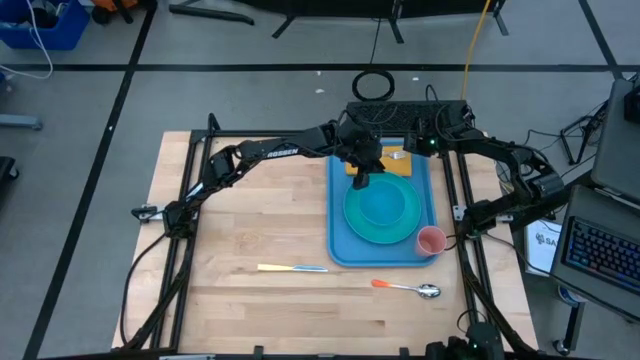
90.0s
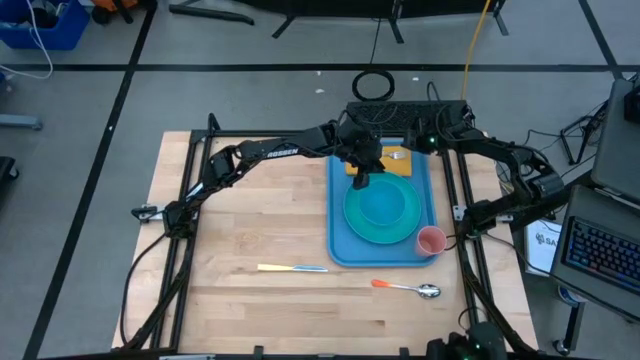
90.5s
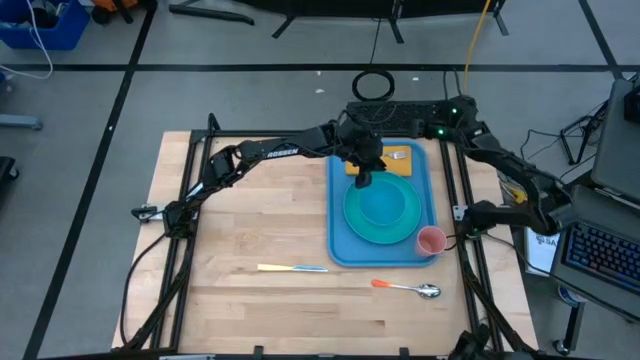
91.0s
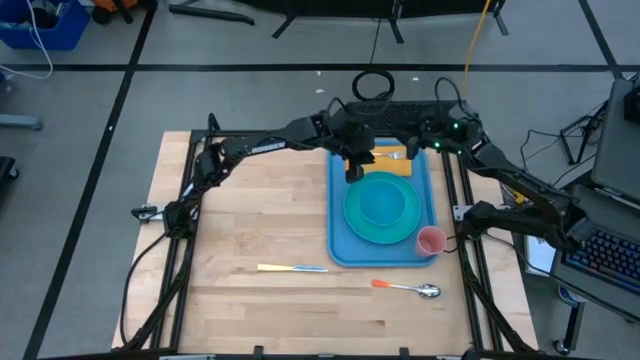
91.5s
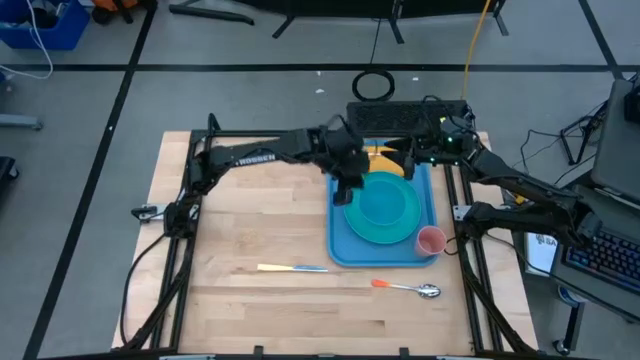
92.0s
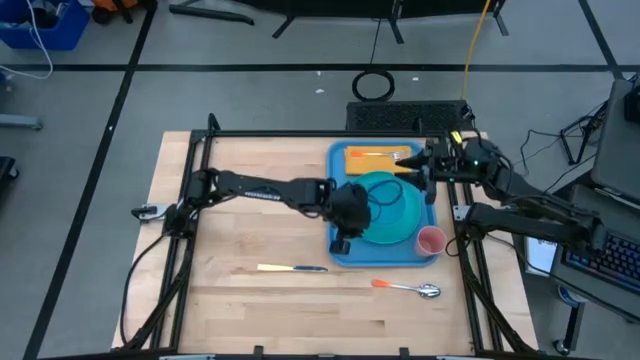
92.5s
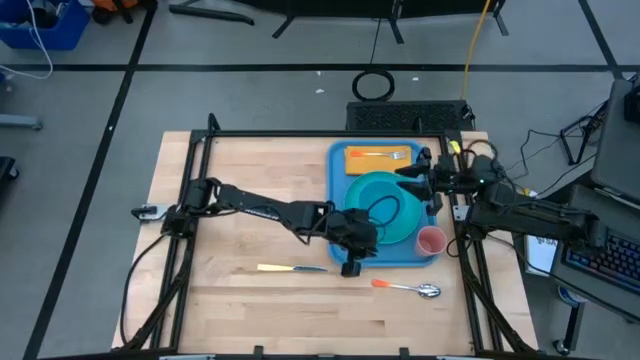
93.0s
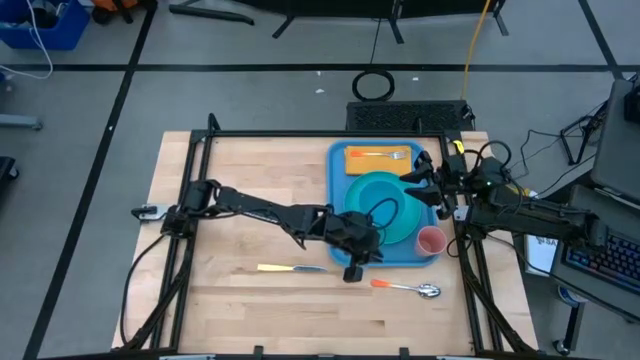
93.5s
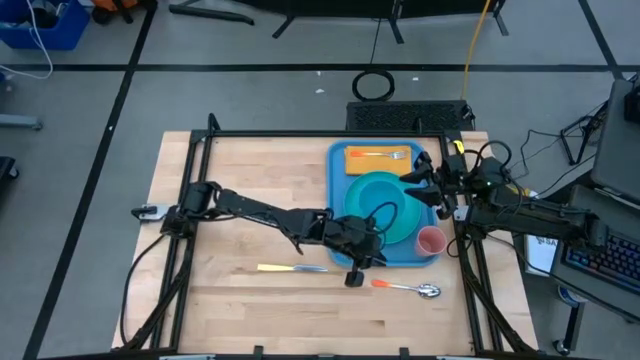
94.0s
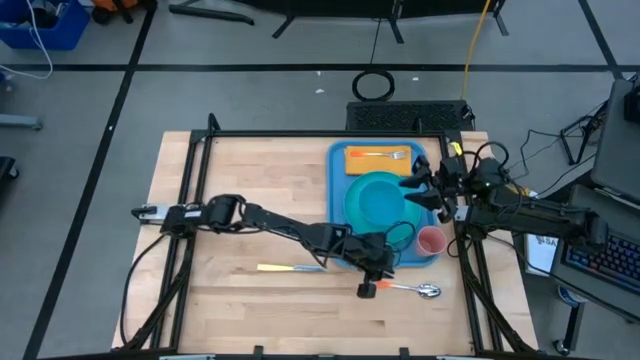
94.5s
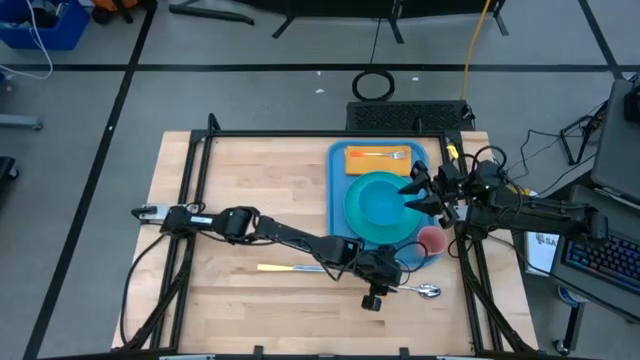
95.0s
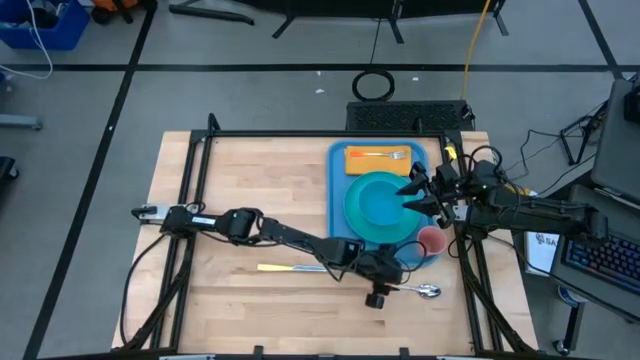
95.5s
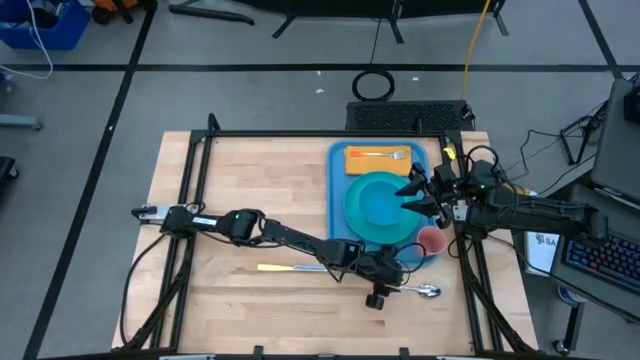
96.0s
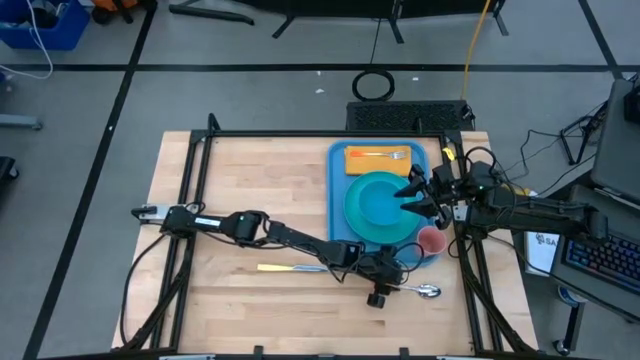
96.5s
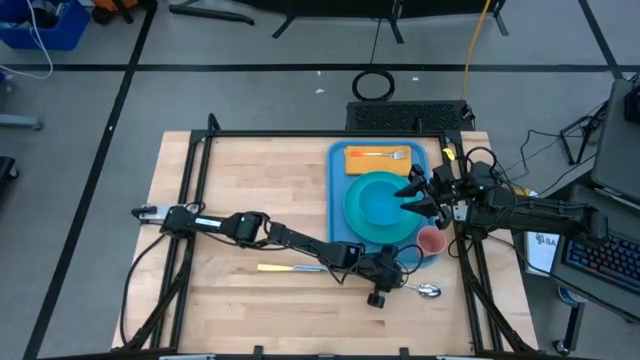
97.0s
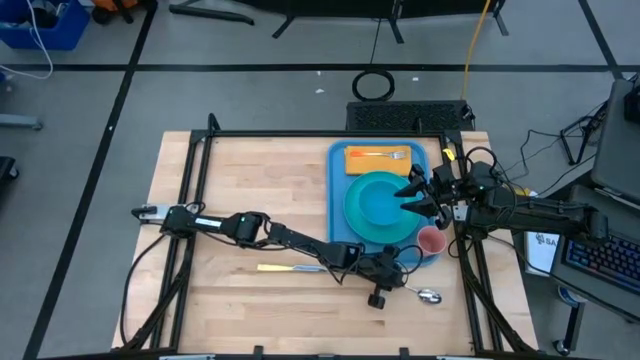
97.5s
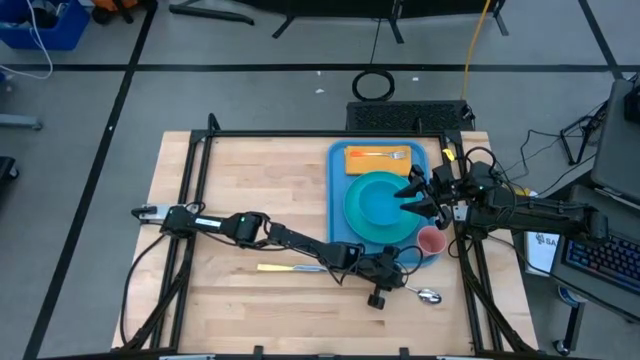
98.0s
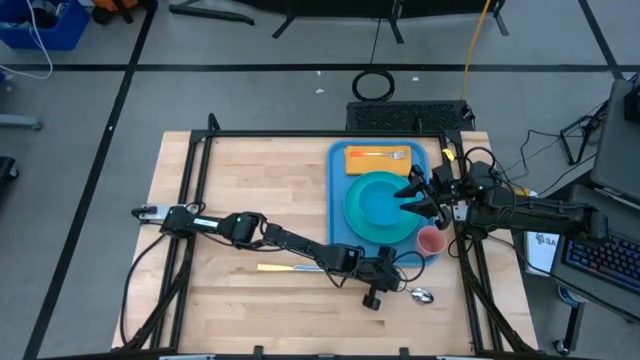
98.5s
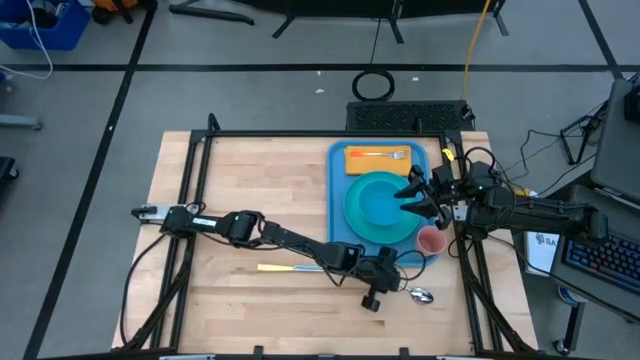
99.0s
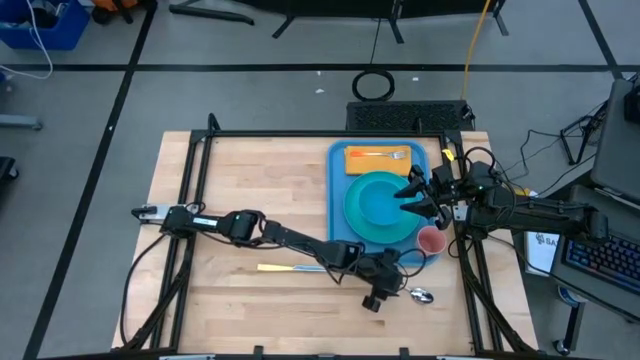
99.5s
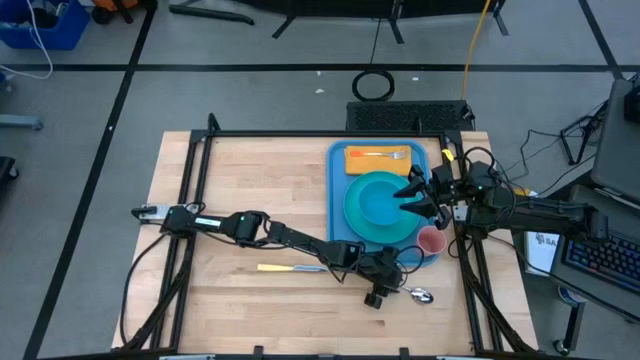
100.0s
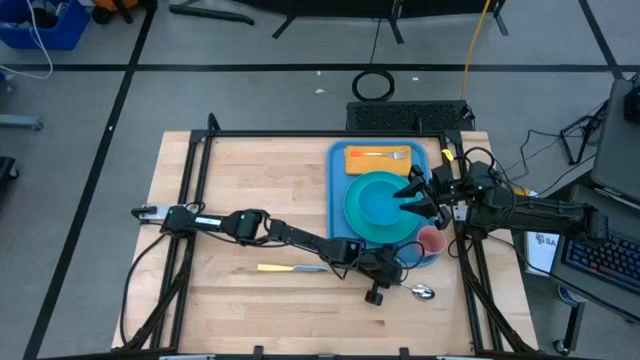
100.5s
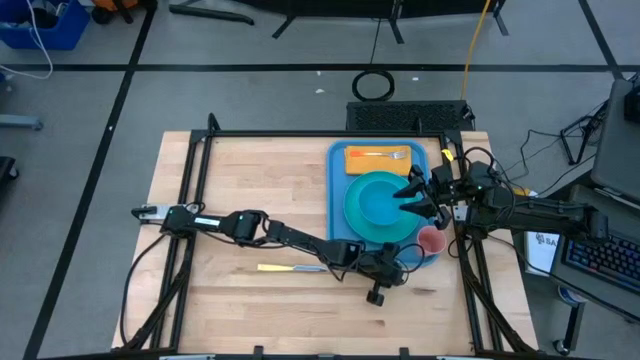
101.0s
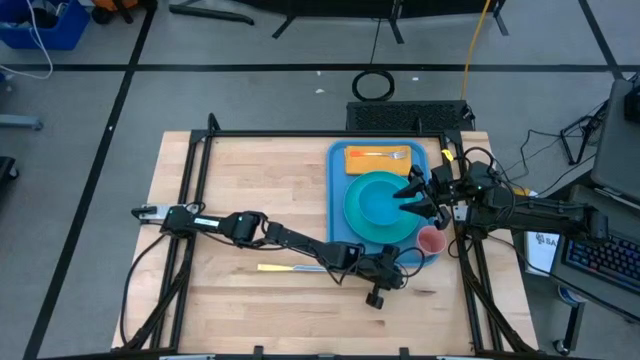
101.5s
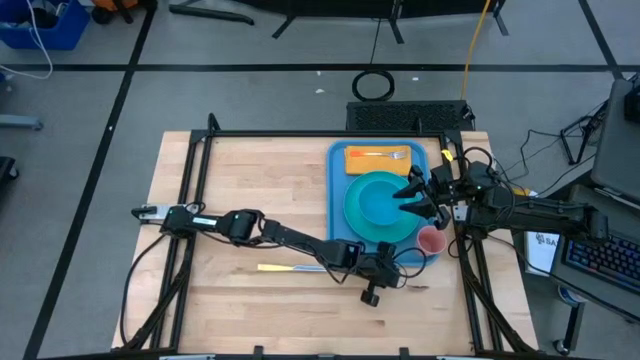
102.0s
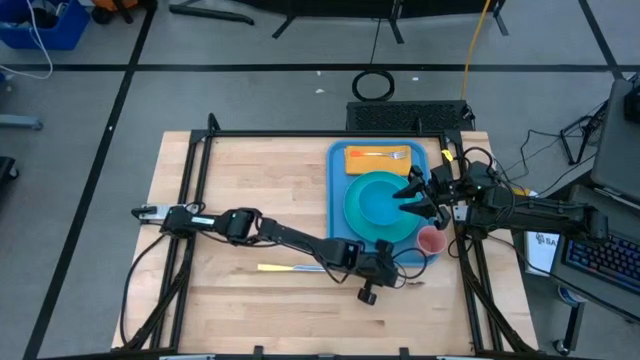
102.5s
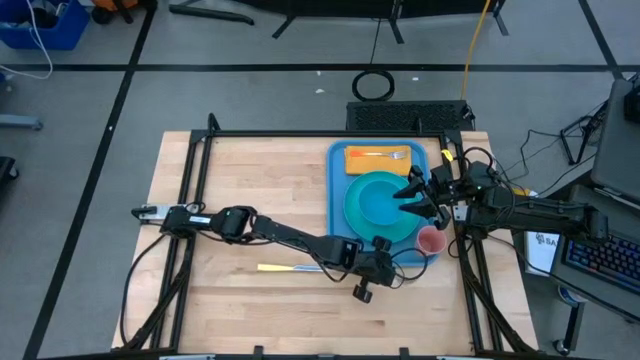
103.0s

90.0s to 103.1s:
Task: Set up tray
Put the orange spoon to the right of the orange fork on the yellow table napkin on the blue serving tray

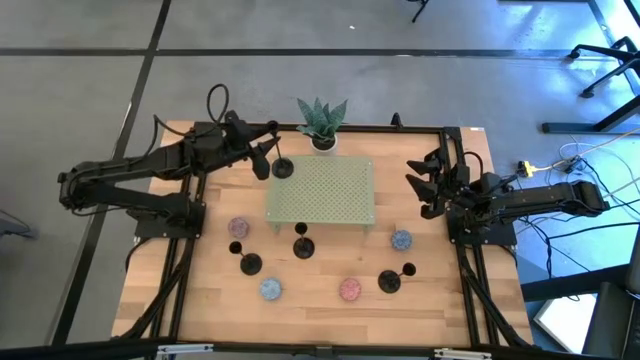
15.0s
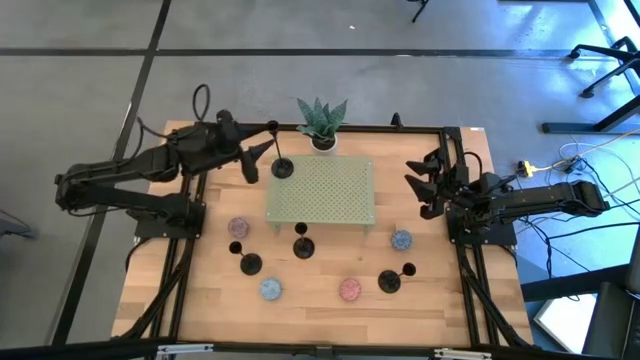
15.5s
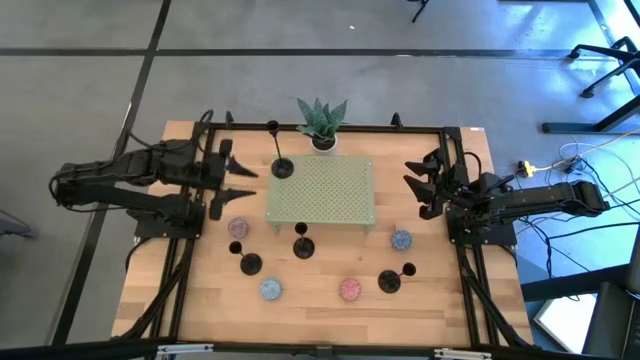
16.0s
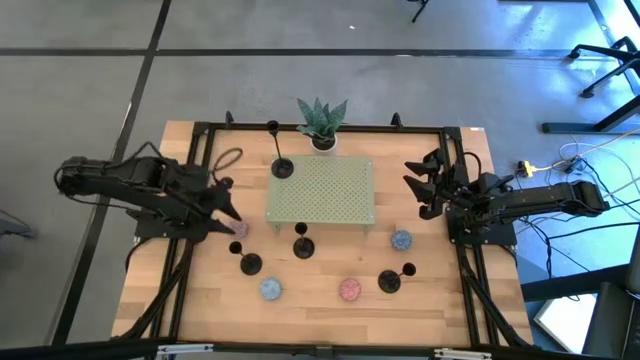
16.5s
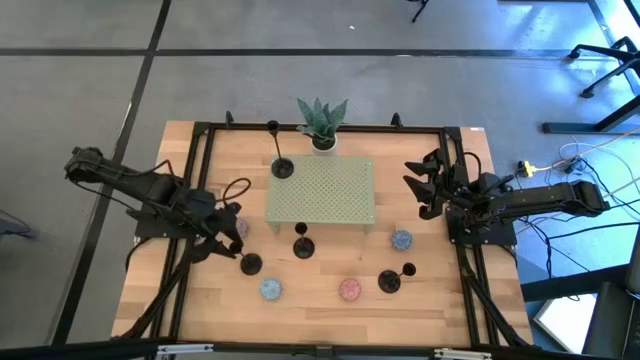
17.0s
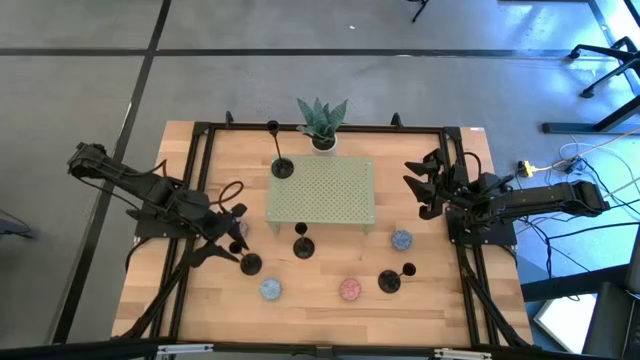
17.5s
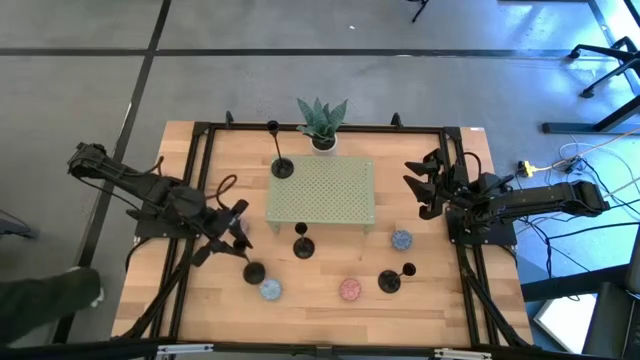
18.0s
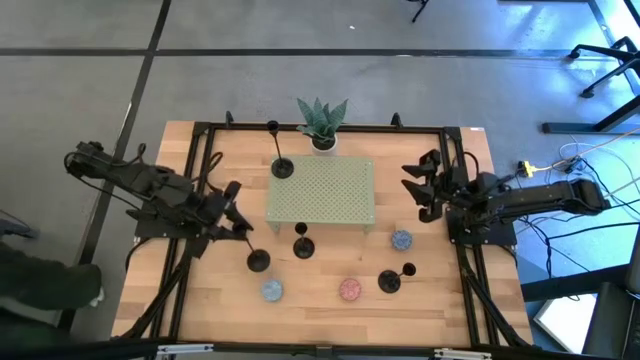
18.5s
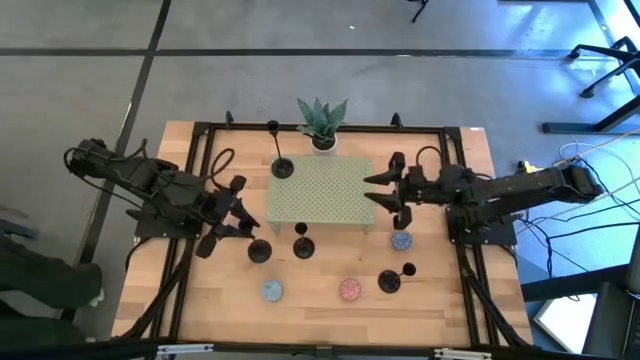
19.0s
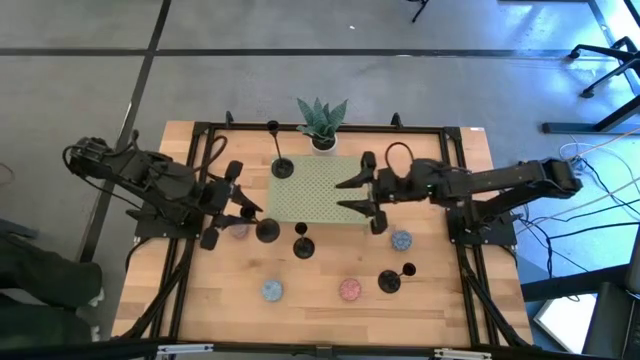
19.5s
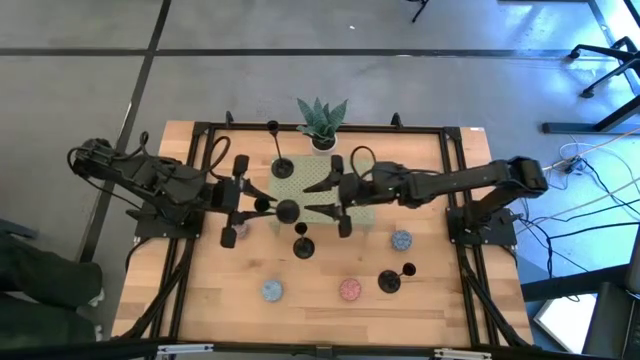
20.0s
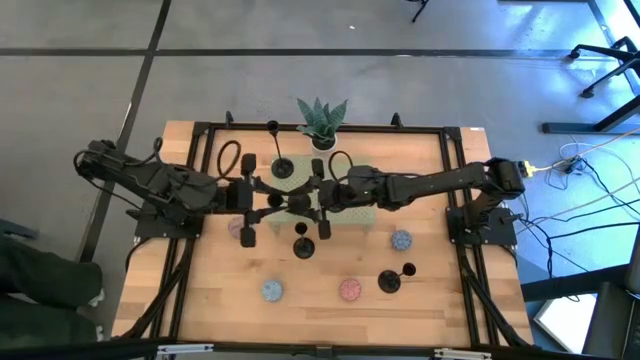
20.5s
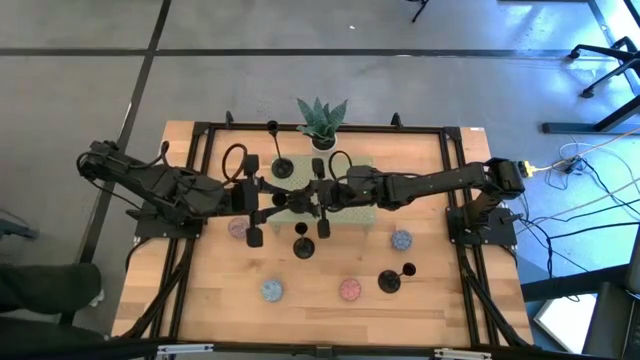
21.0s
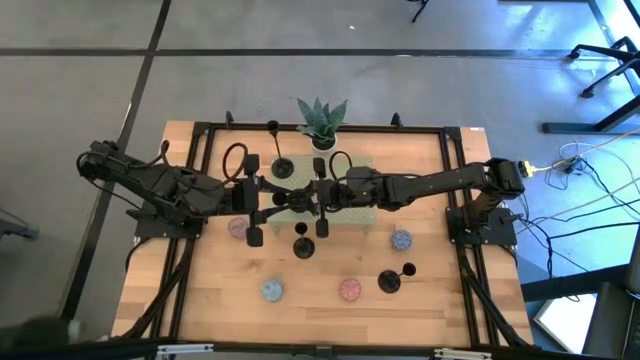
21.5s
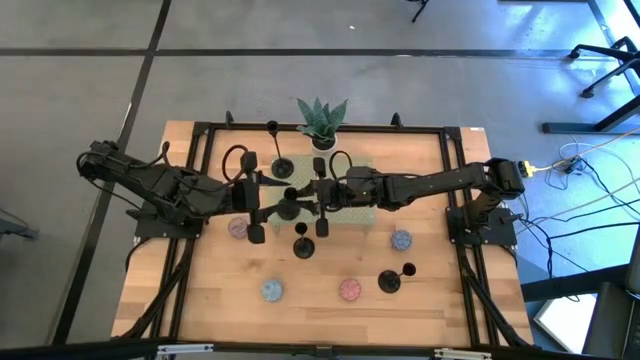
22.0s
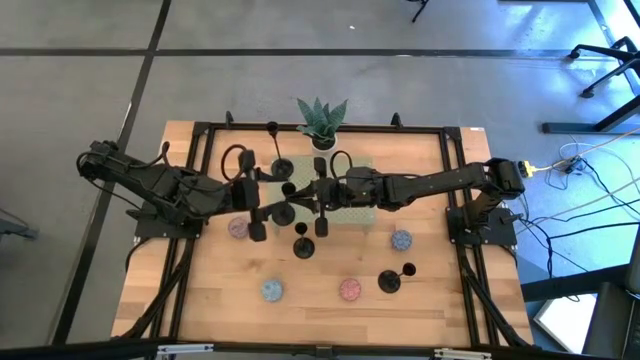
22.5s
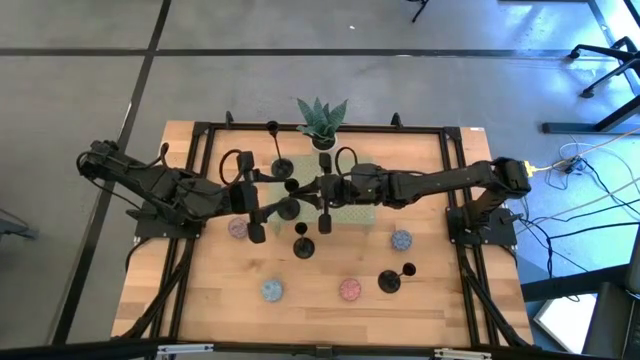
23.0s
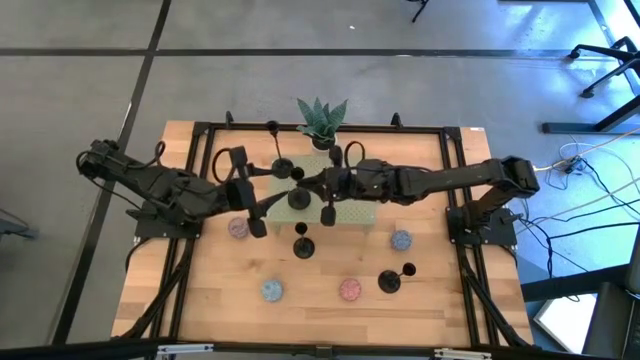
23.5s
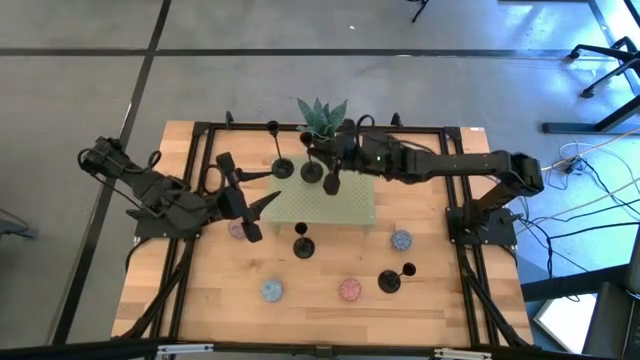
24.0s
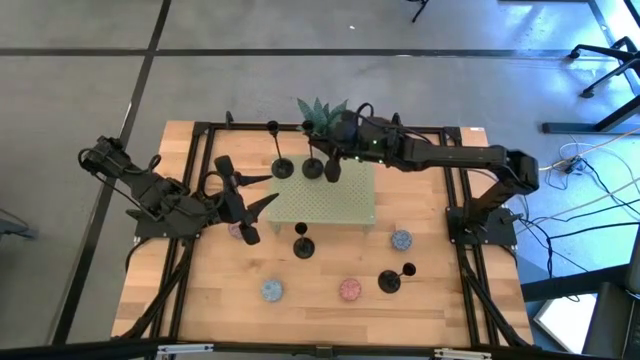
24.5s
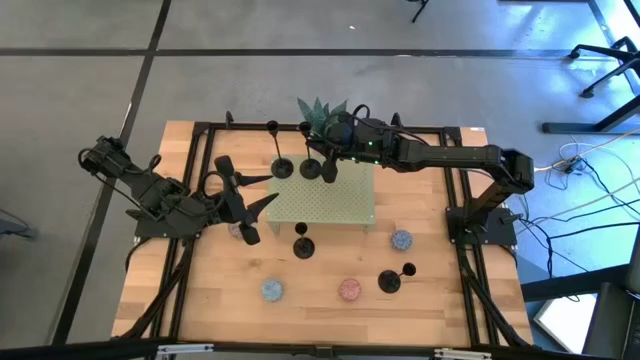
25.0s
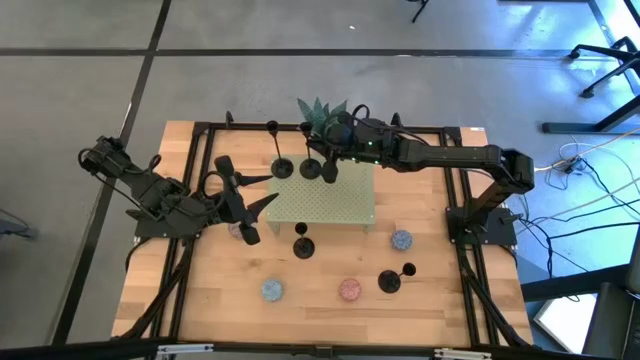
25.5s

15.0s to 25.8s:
Task: Pick & Place candle stick holders
Put the black candle holder on the shelf
